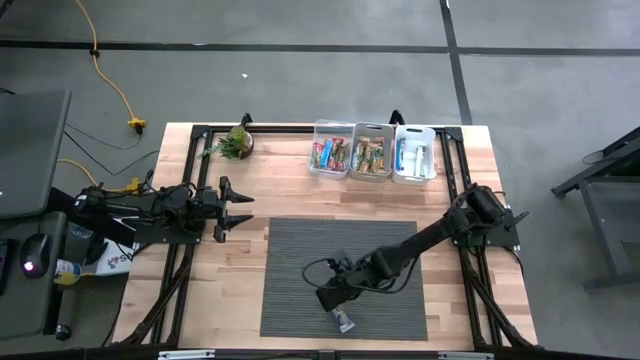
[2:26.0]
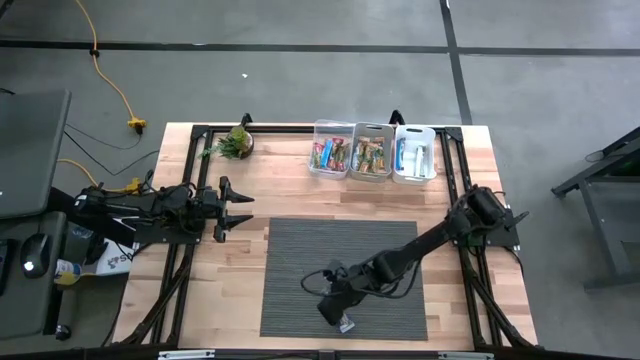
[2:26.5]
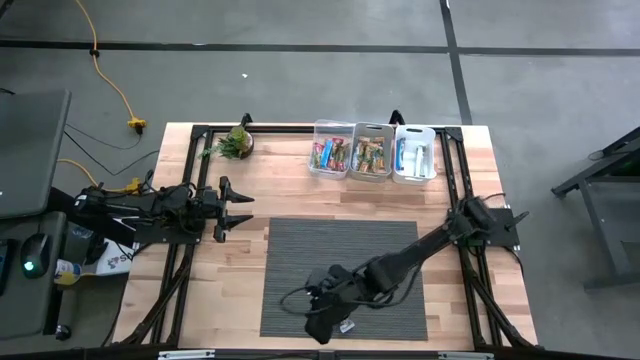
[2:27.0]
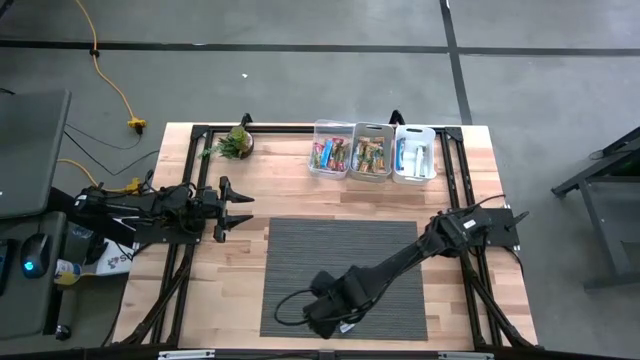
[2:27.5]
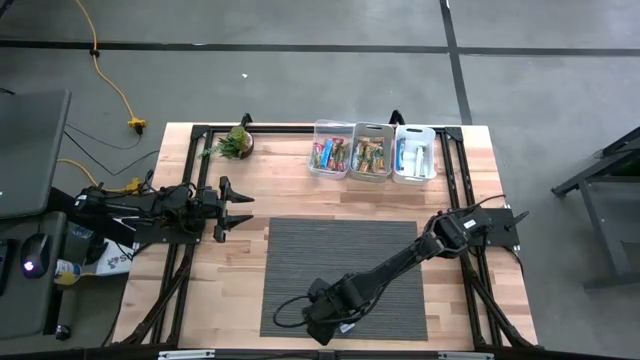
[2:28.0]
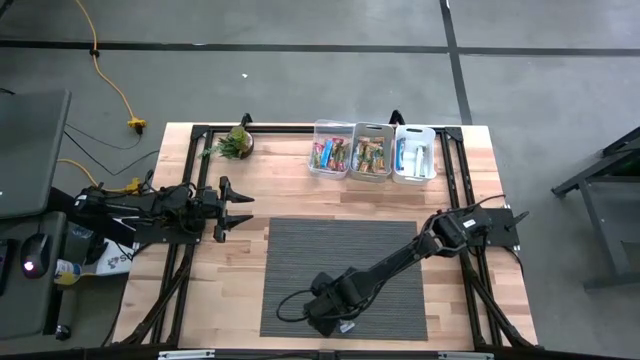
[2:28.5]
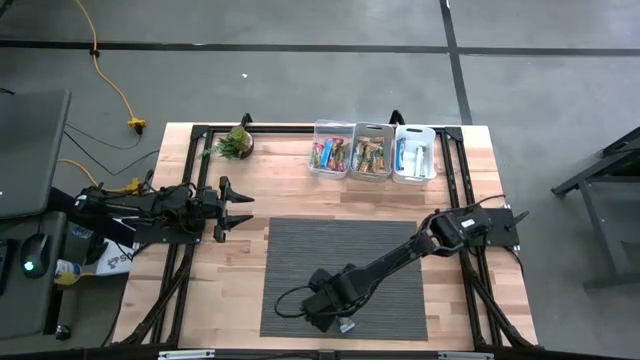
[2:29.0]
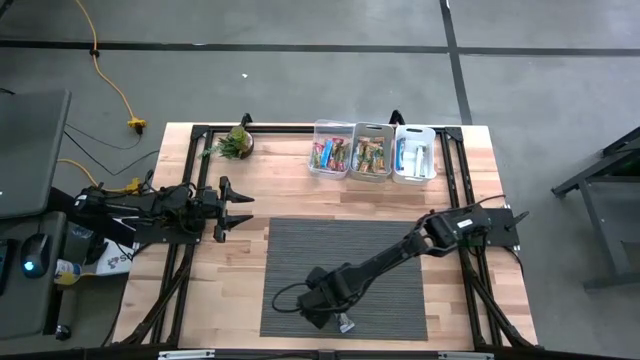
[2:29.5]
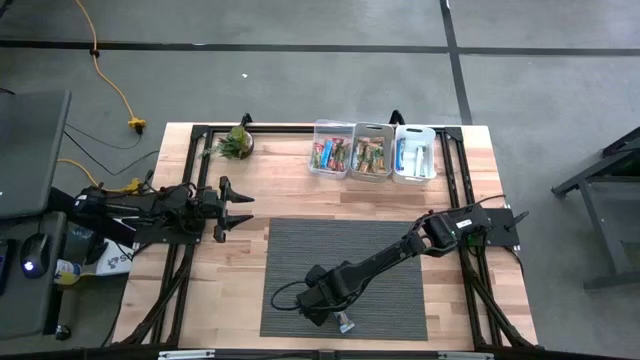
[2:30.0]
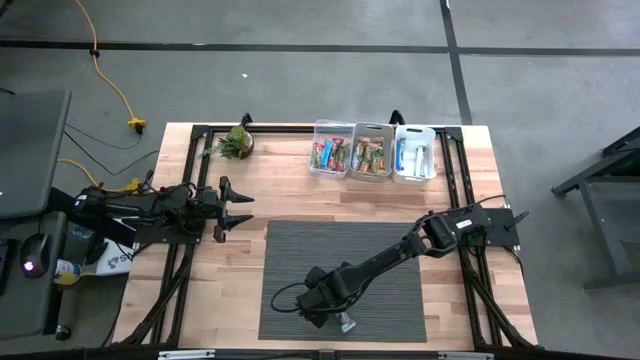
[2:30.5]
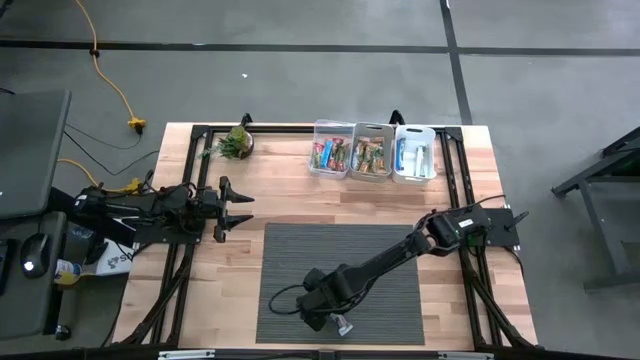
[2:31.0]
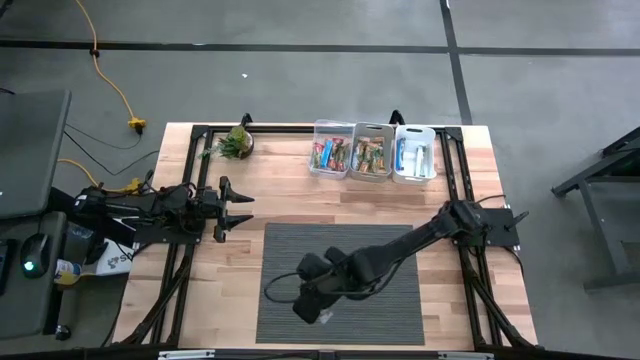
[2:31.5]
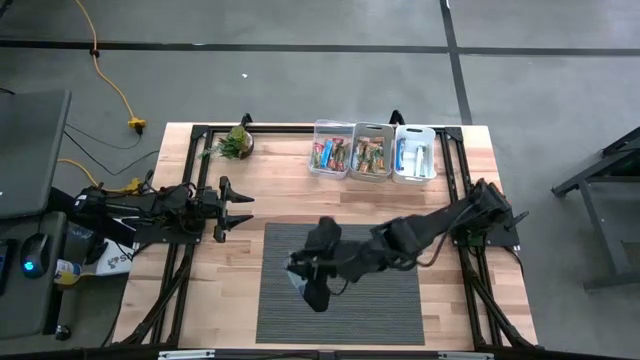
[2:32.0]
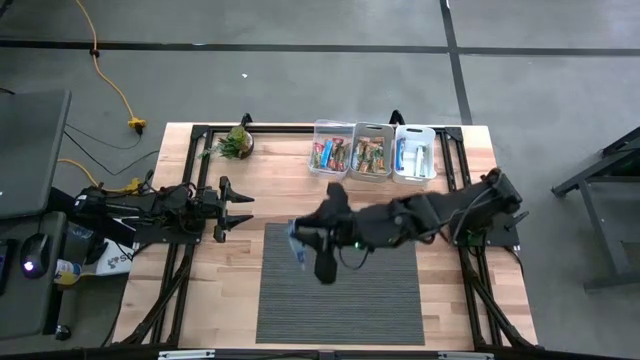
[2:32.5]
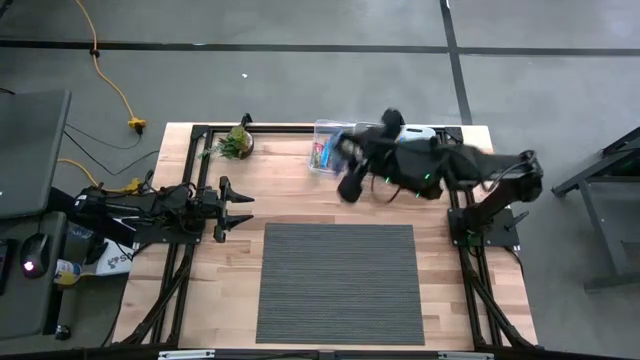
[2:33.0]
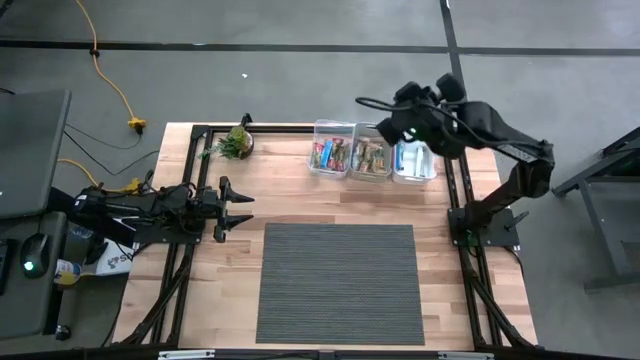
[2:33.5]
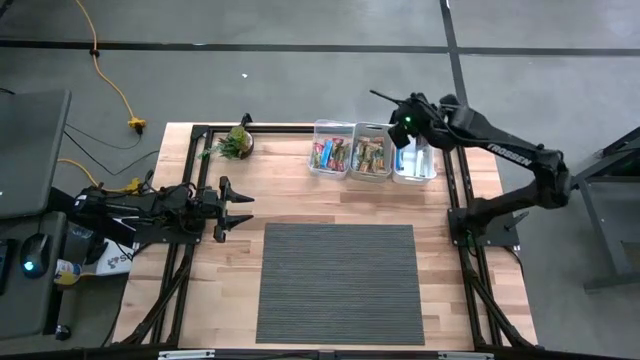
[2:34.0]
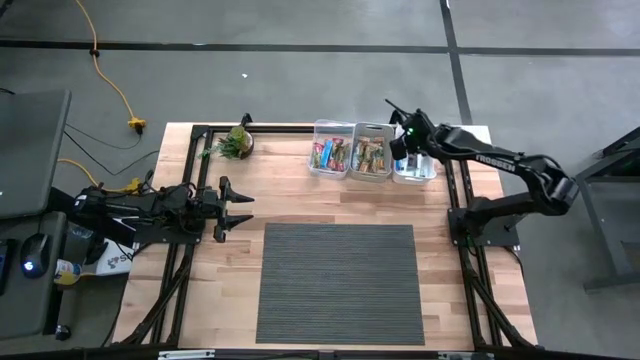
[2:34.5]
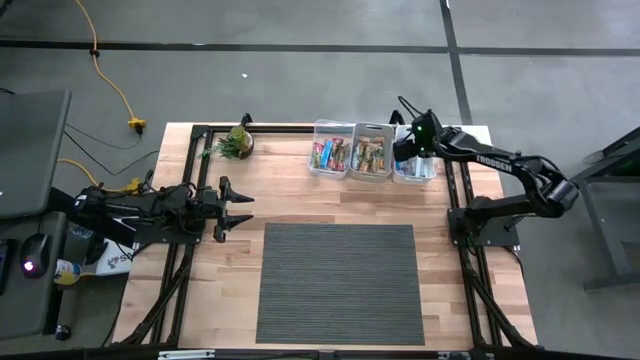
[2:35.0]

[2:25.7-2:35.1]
Task: Pick and place Granola Bars by type
Put the blue granola bar into the white bin

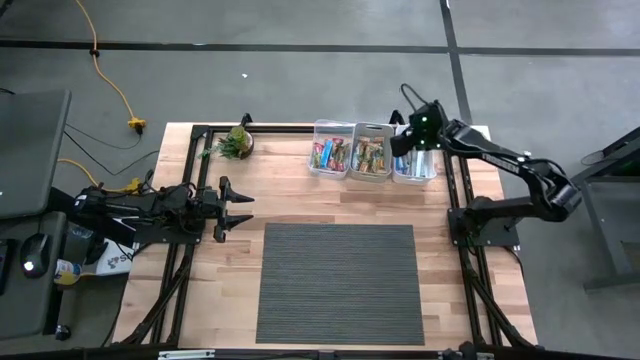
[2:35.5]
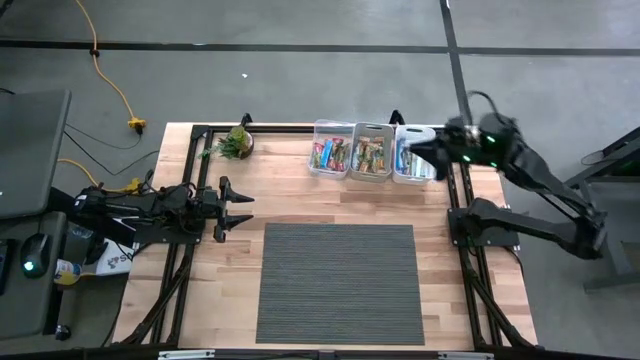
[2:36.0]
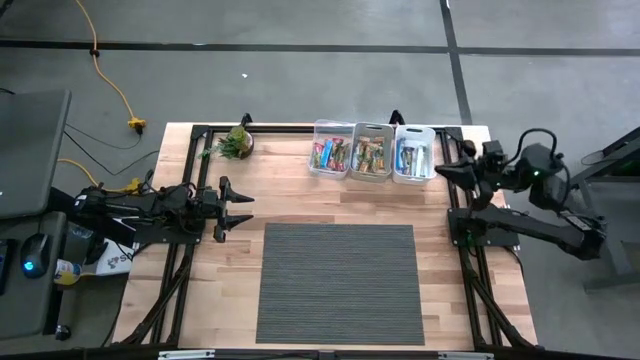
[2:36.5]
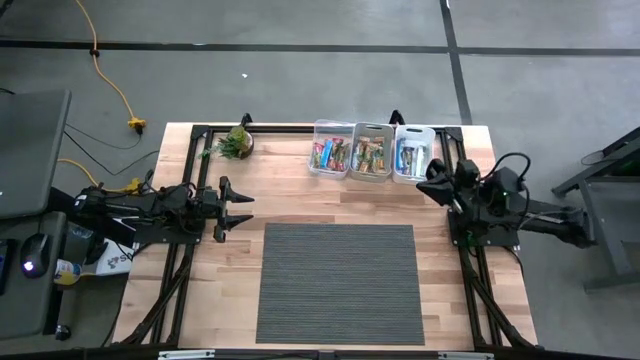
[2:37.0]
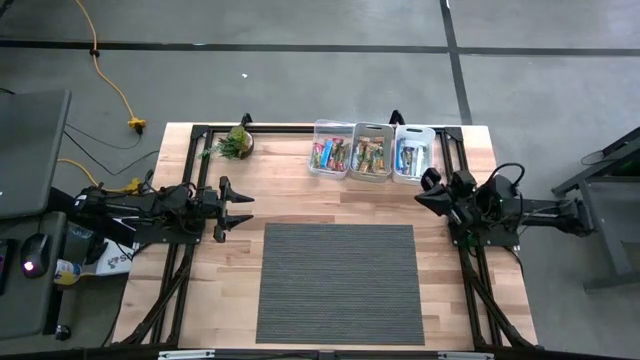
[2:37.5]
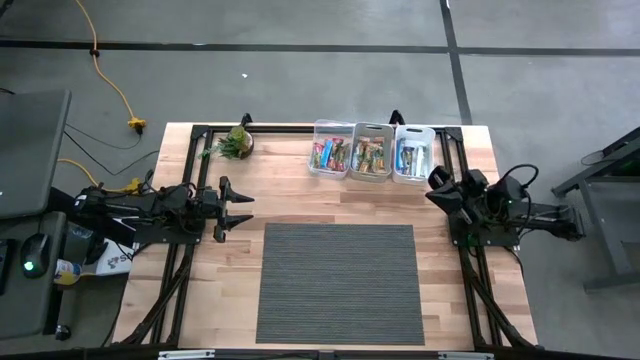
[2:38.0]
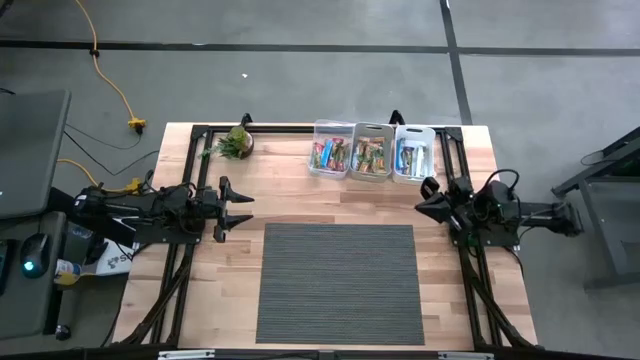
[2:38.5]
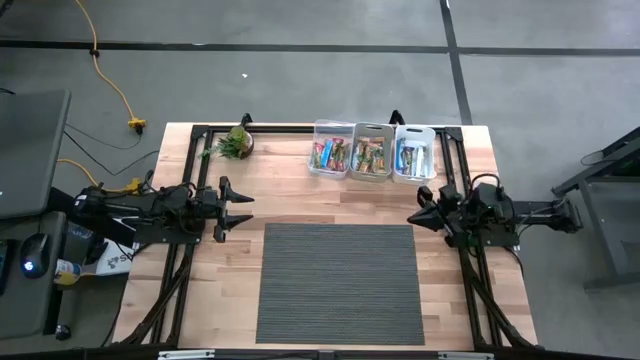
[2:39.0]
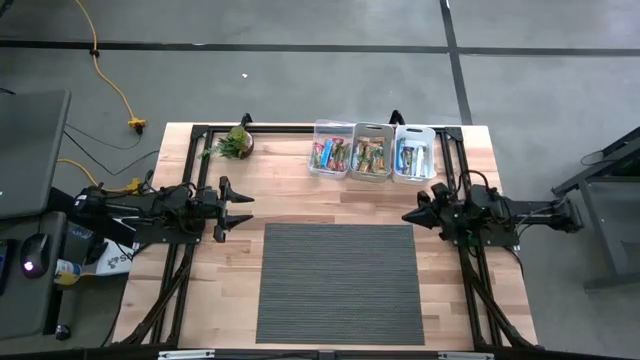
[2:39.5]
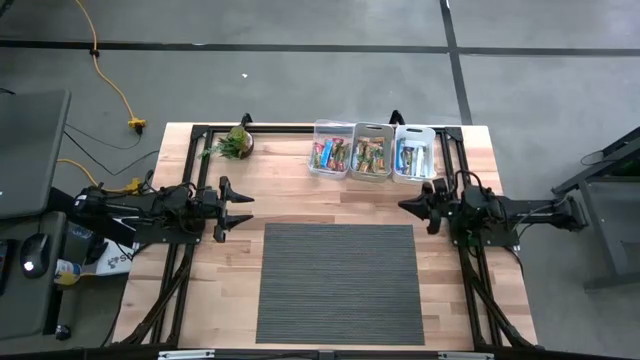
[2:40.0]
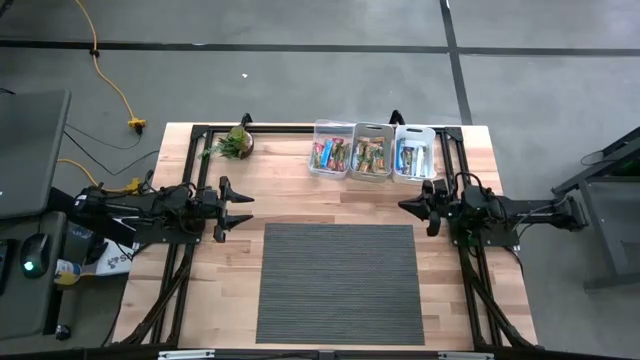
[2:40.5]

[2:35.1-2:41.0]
Return to Home Position

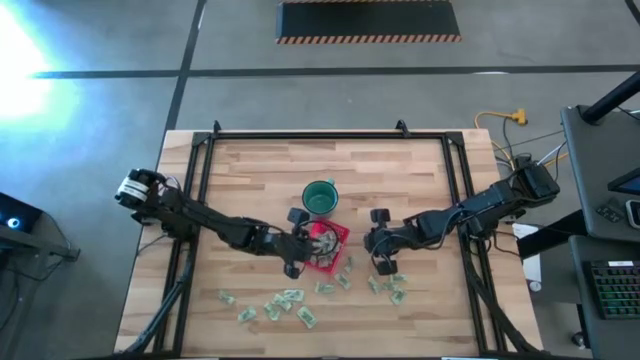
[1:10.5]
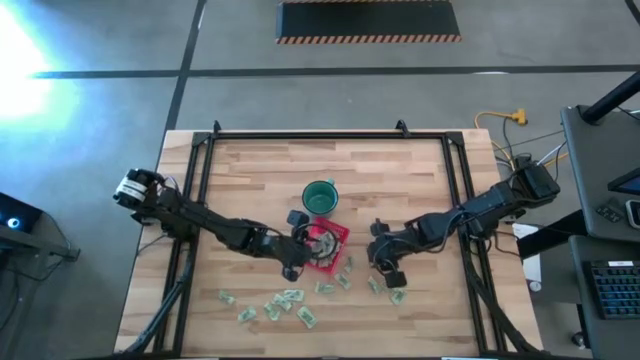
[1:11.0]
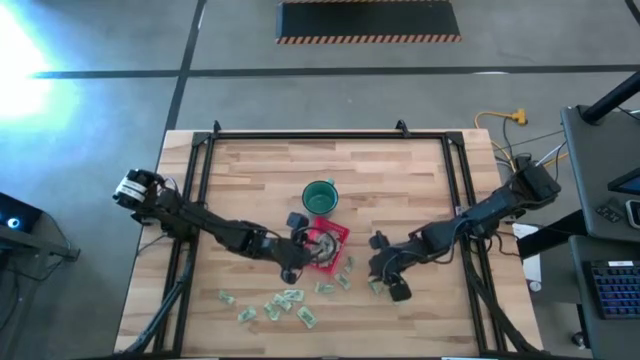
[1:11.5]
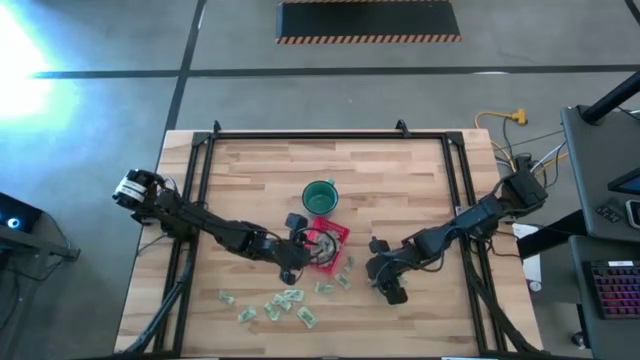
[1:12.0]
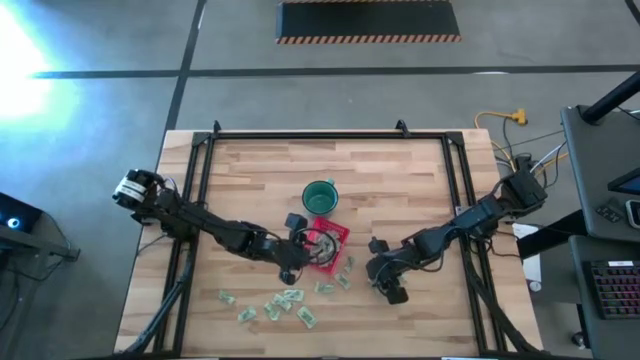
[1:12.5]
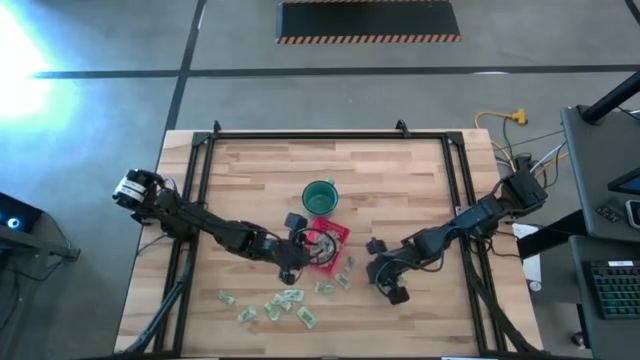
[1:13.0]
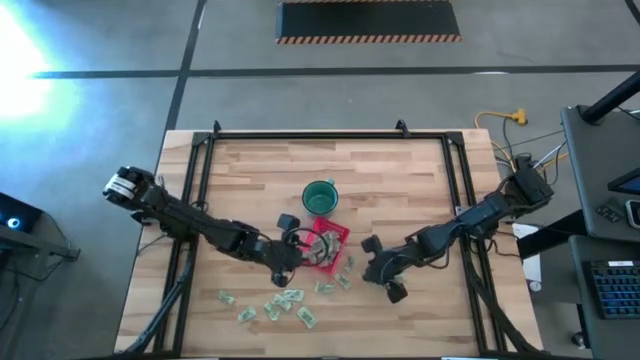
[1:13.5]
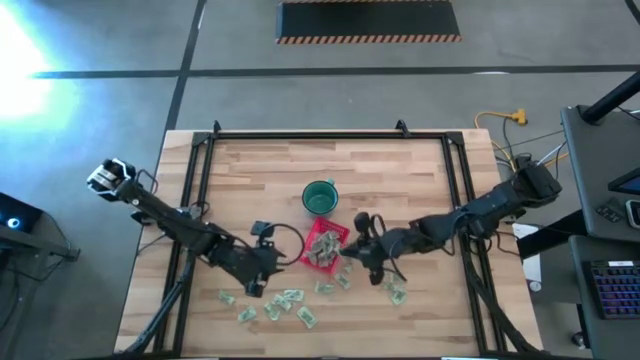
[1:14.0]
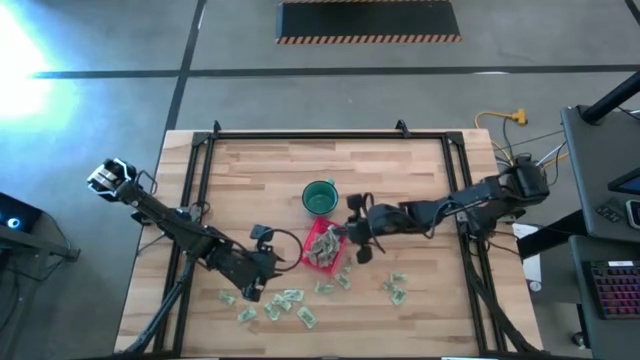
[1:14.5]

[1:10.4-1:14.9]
Task: Pick and place items into bin
Put the light green stevia packet into the red bin

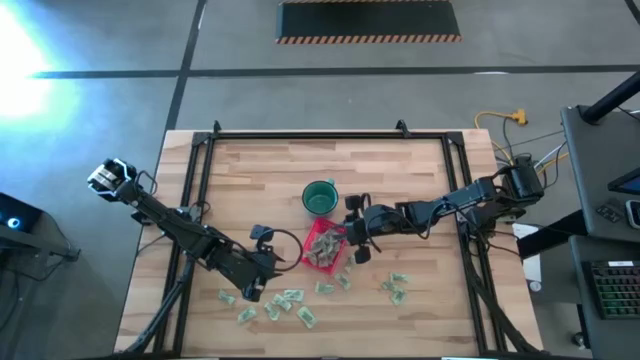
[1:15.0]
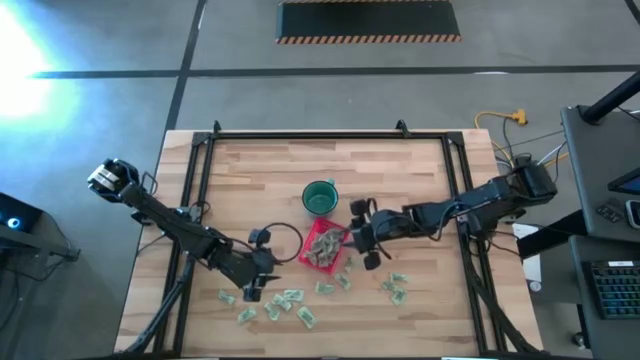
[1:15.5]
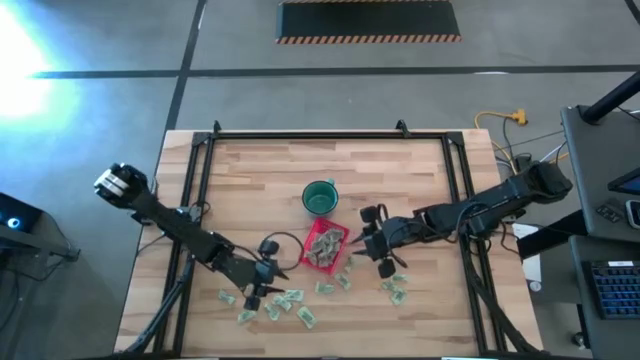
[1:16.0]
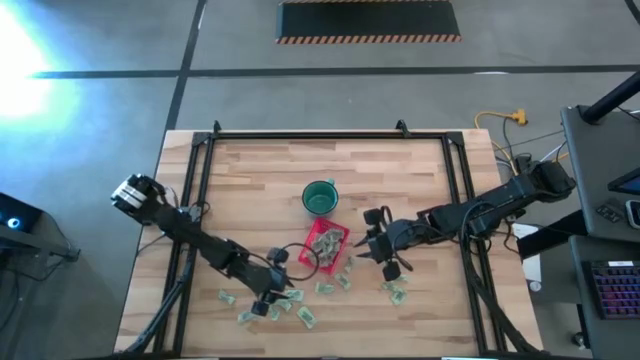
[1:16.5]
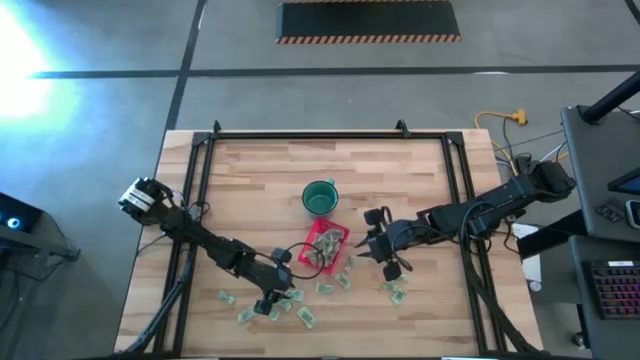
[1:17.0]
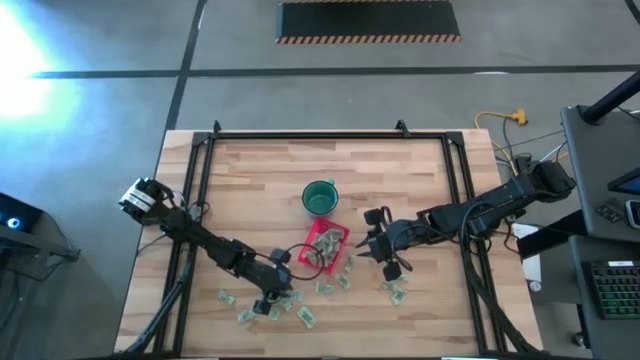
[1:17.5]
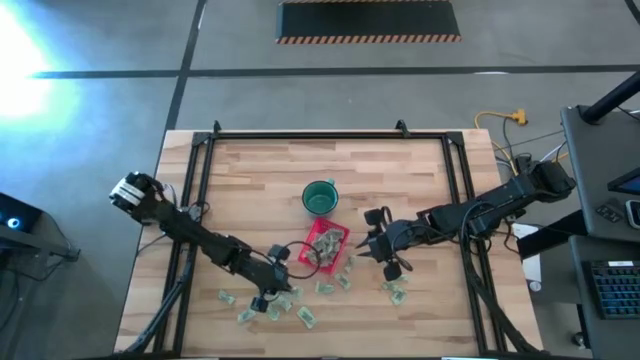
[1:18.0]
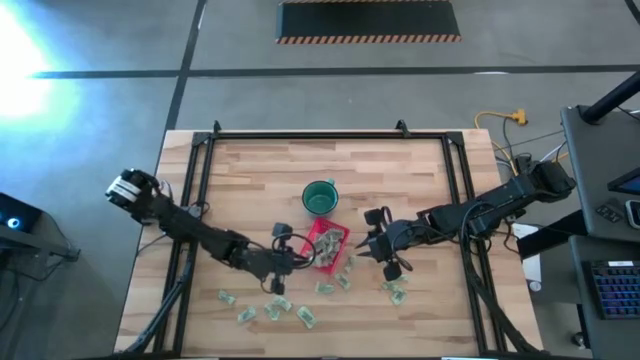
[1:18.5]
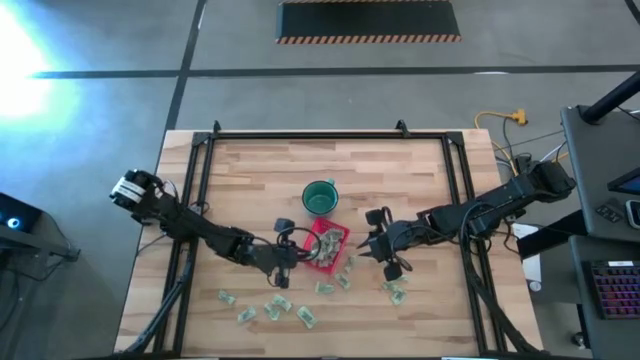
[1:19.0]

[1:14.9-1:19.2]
Put the light green stevia packet into the red bin
